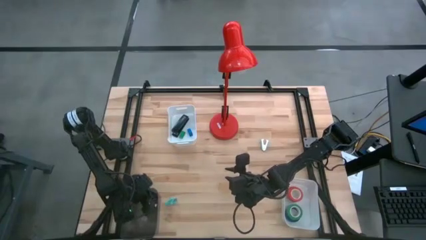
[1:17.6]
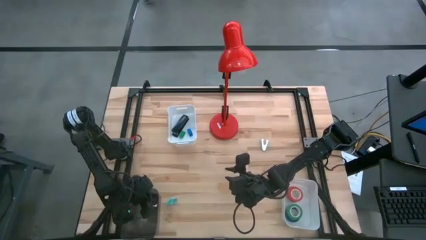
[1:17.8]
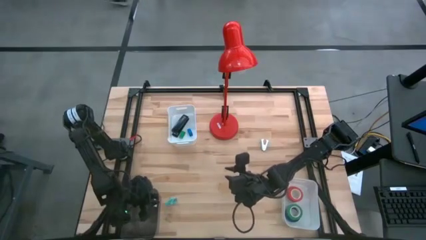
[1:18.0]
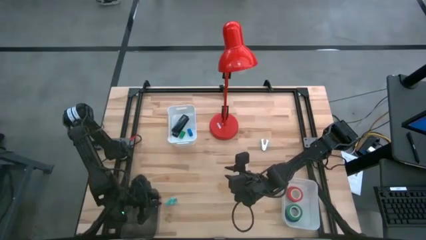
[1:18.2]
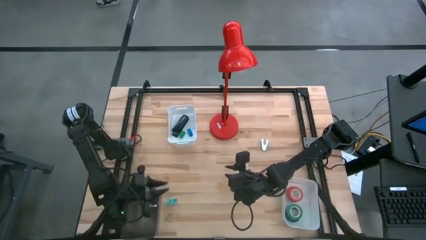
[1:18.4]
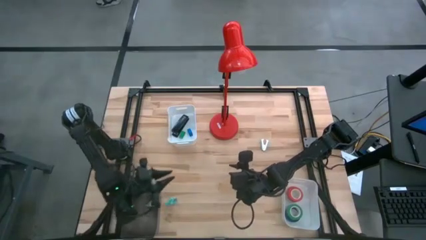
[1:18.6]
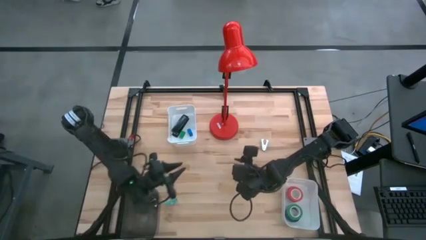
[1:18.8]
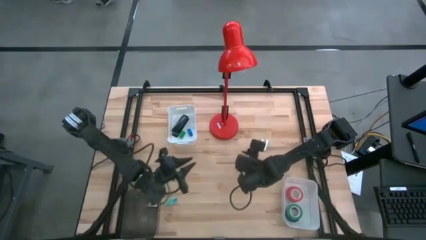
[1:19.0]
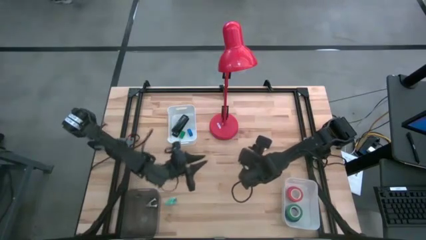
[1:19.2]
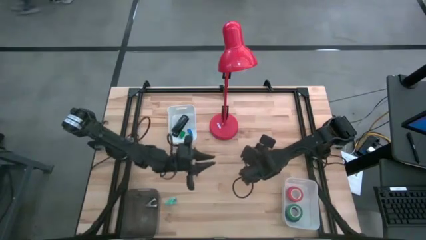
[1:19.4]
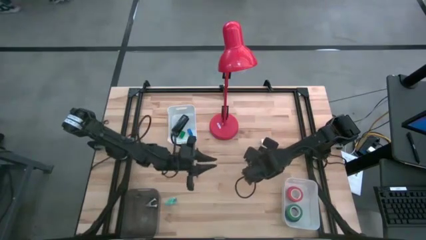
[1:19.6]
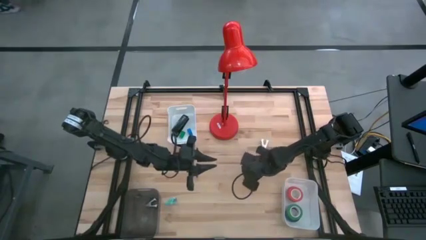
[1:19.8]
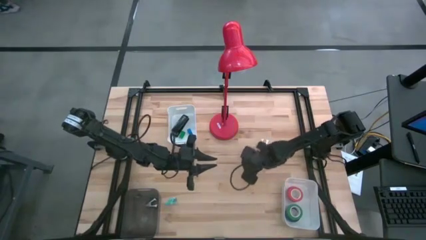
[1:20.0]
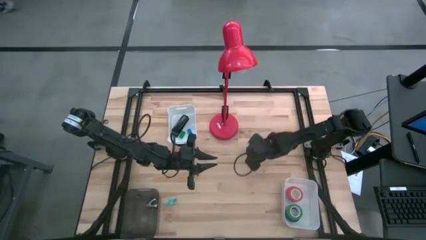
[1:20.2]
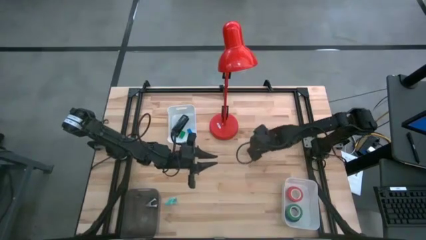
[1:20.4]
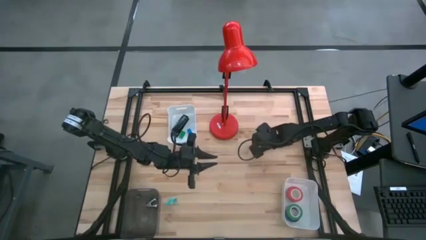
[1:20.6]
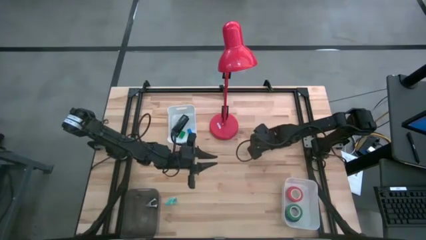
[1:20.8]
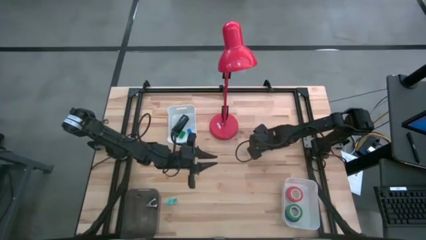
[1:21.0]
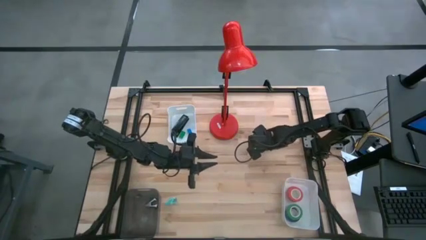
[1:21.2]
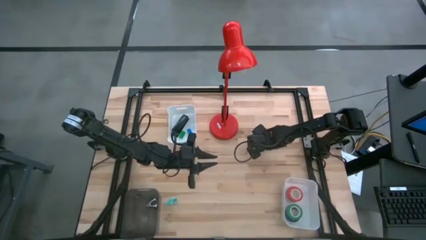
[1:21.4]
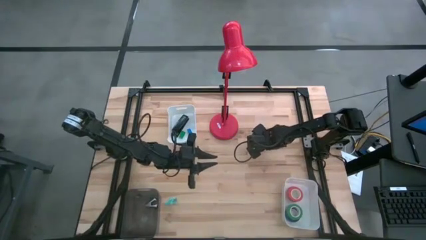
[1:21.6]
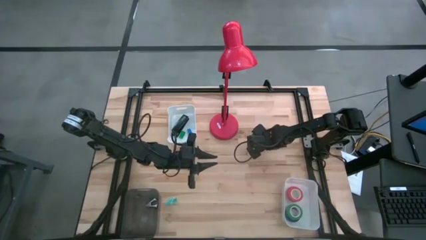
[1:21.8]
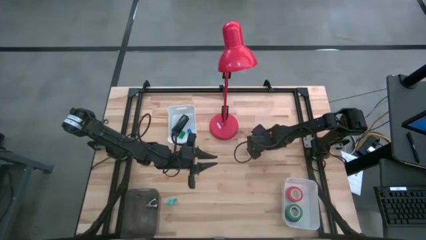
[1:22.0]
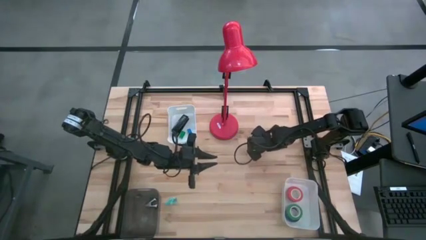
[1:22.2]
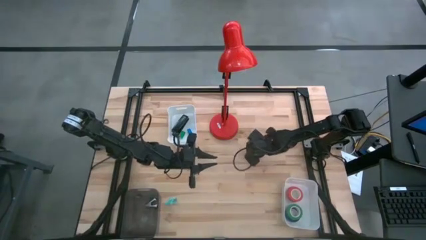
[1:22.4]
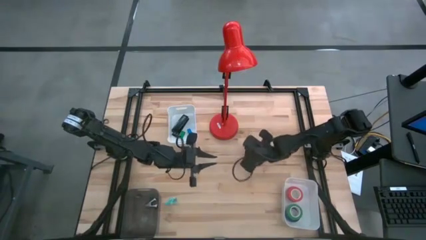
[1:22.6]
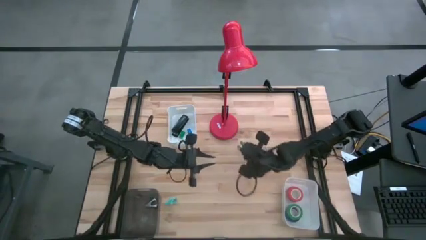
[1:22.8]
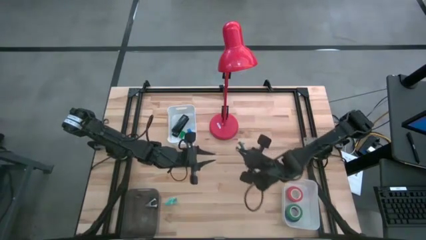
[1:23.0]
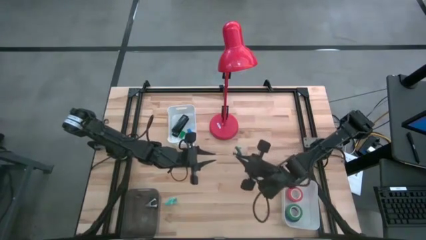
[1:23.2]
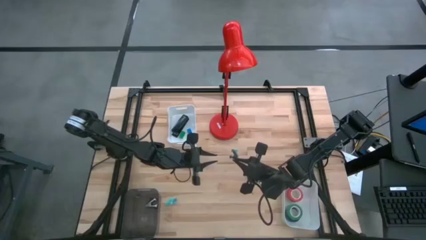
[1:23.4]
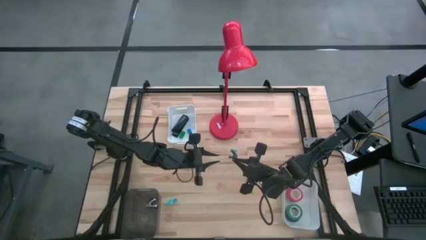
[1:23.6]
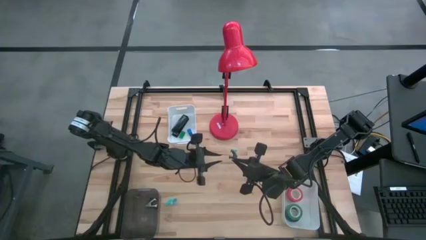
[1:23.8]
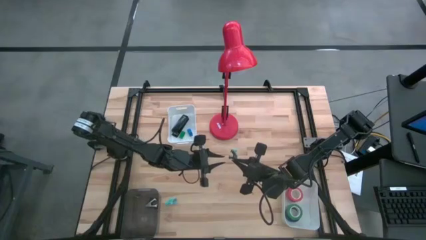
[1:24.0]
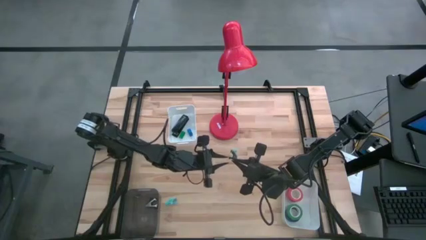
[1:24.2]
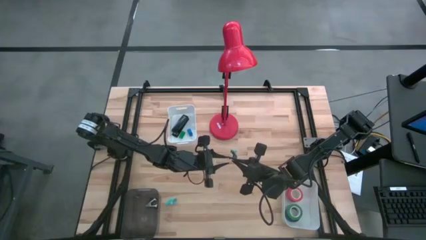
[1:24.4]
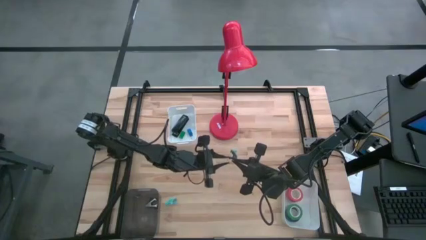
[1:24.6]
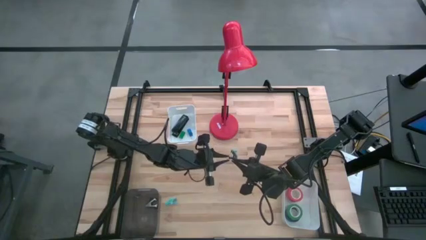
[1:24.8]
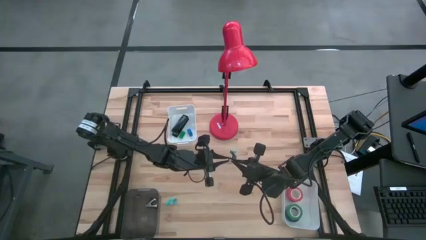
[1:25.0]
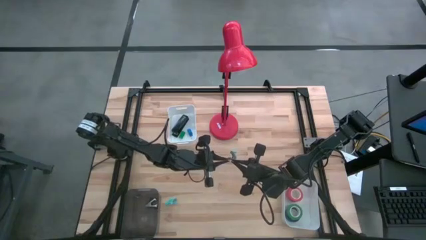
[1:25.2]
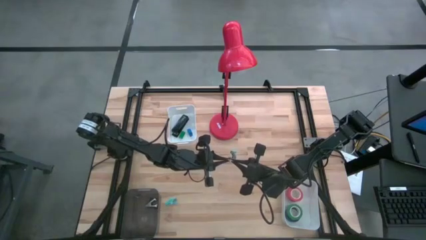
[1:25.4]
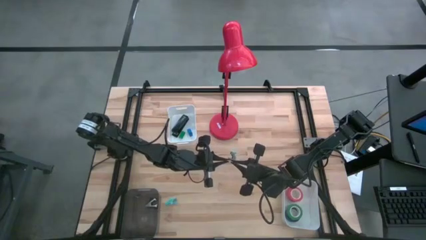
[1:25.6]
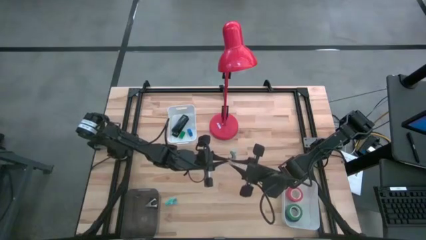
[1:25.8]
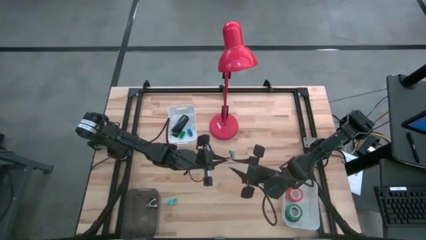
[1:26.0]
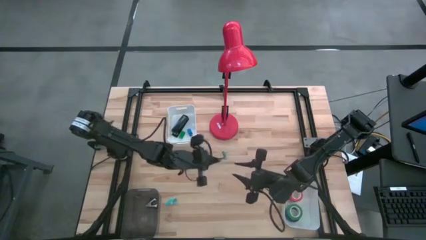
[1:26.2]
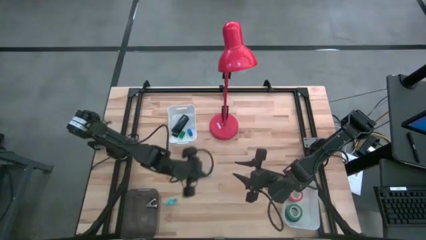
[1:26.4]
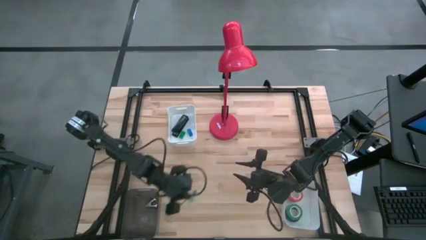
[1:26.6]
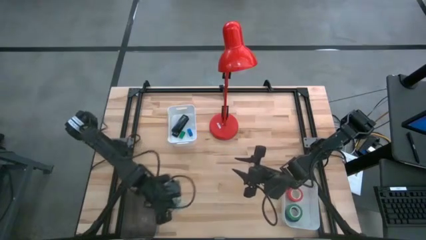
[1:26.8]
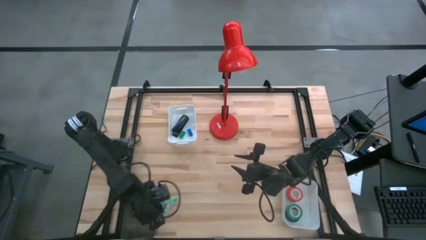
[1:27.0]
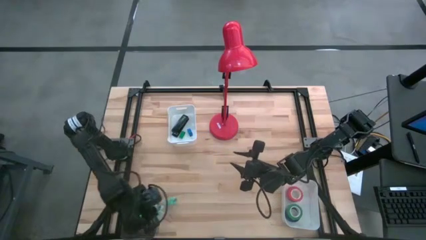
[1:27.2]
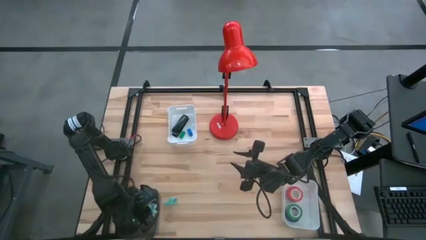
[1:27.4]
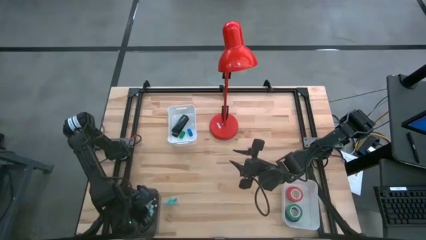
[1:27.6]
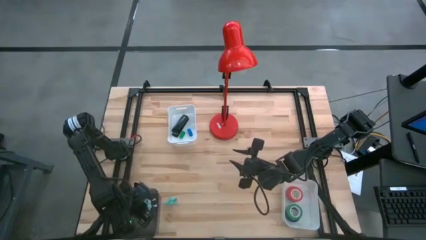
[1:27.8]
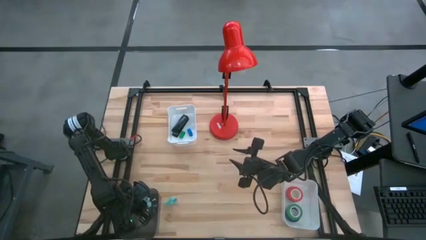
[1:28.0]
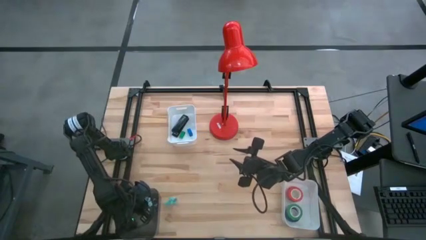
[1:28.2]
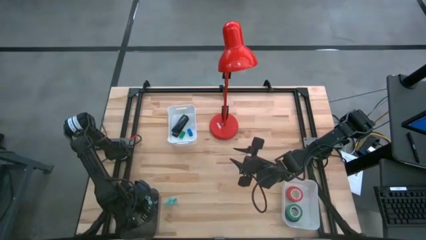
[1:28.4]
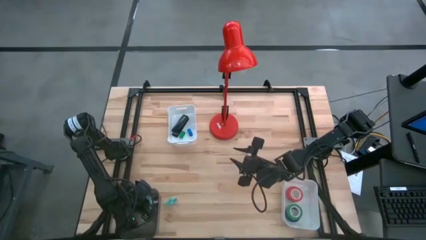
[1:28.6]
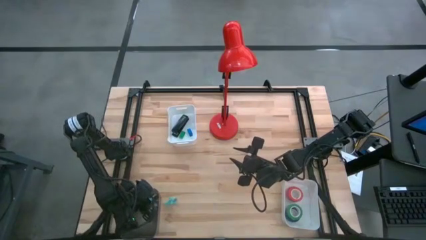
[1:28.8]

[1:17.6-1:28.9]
Task: Pick and place Stapler, Stapler remover, tape
Put the right blue staple remover into the black bin

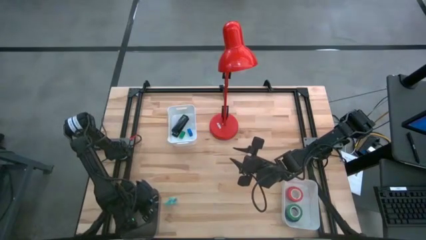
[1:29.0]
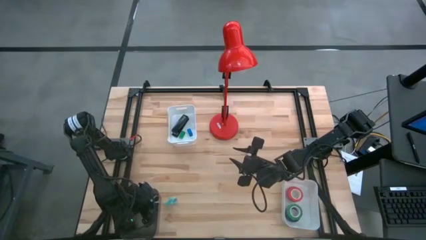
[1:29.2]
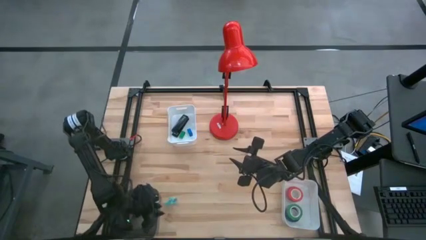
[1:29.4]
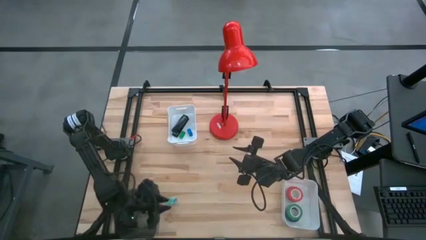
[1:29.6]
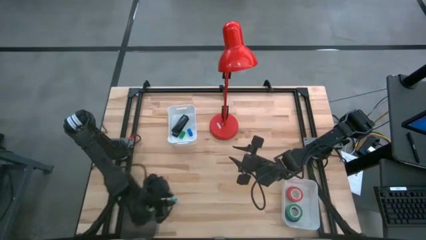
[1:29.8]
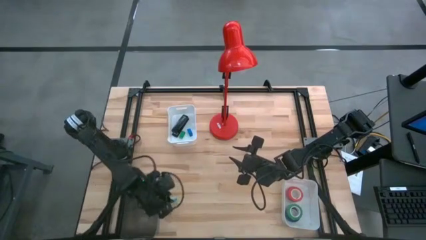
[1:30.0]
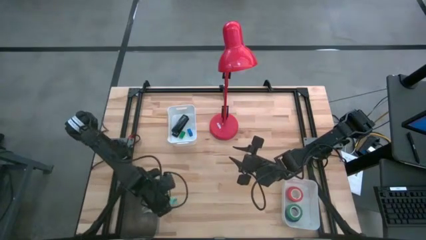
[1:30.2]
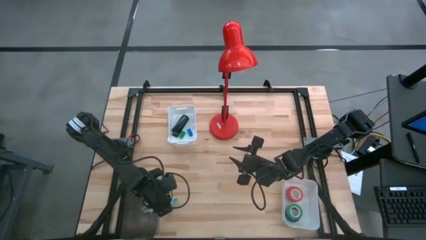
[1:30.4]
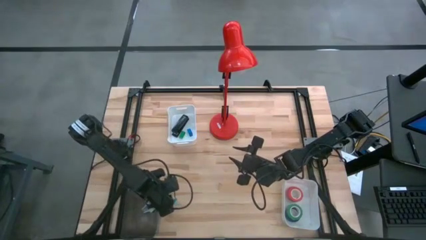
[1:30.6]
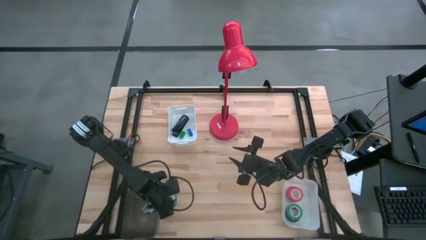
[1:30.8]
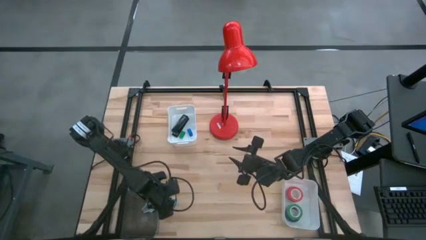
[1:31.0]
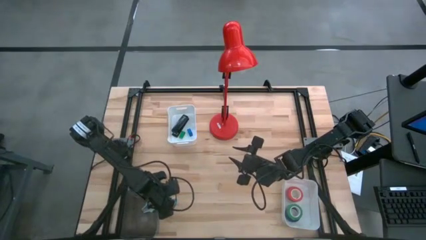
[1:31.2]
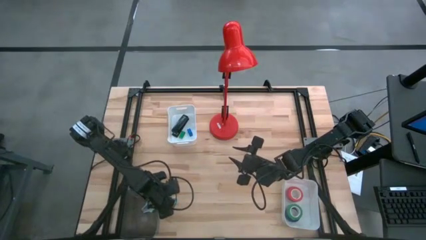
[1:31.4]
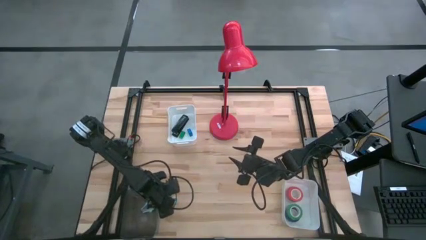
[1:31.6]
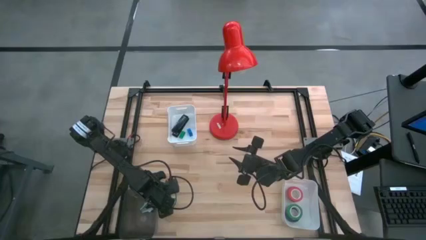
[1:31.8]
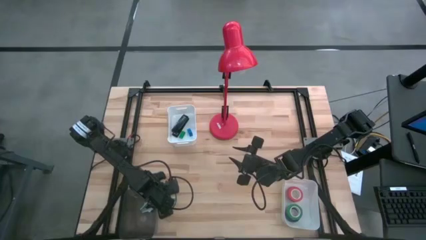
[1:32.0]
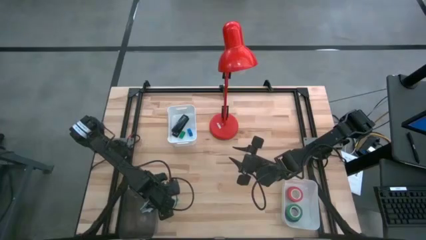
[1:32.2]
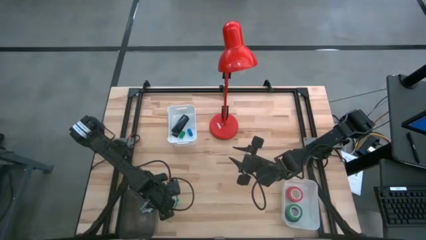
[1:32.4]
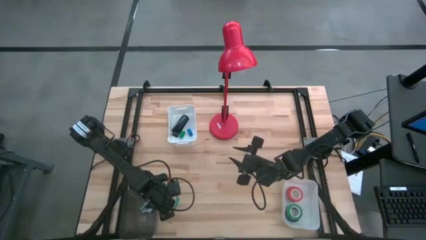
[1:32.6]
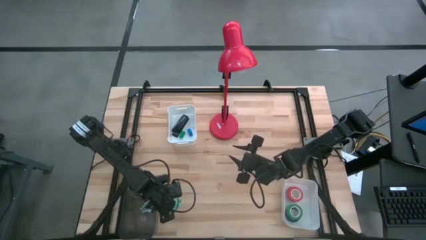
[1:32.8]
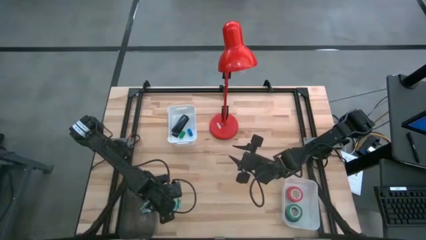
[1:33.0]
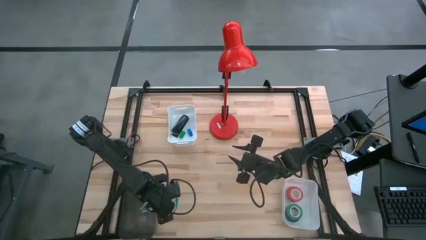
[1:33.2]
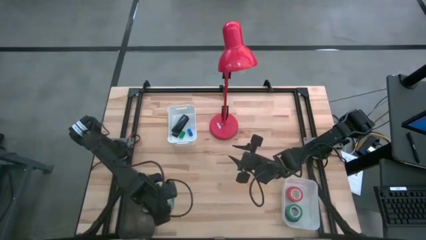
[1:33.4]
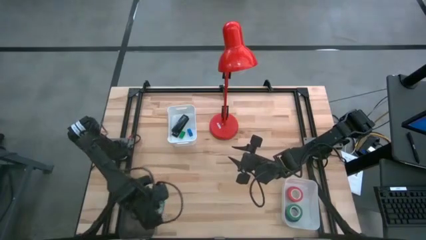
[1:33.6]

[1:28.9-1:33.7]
Put the blue staple remover into the black bin
